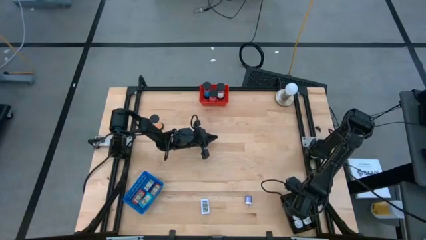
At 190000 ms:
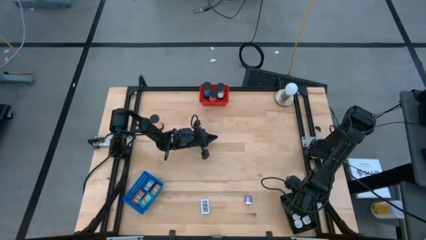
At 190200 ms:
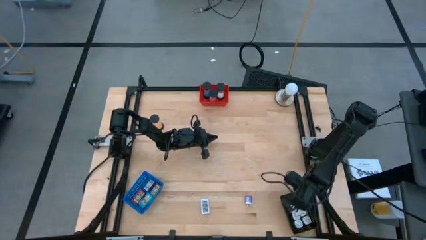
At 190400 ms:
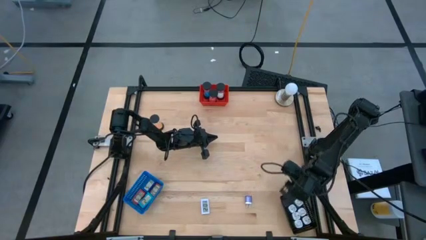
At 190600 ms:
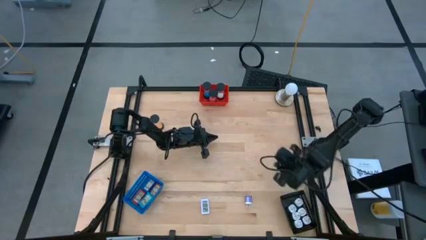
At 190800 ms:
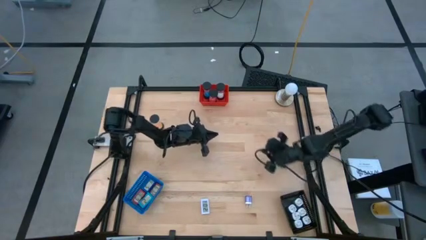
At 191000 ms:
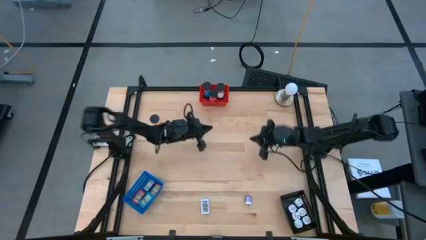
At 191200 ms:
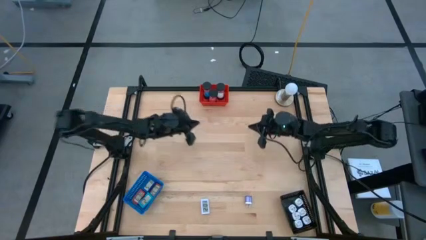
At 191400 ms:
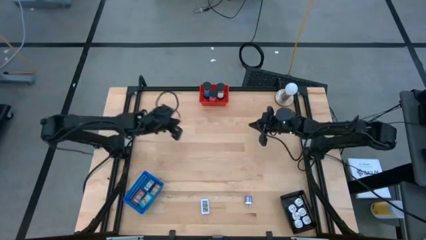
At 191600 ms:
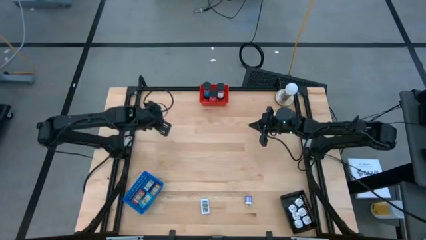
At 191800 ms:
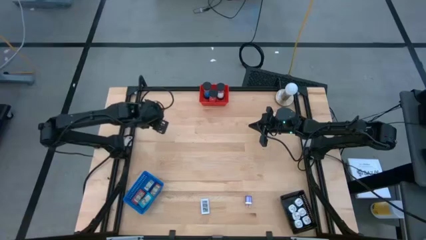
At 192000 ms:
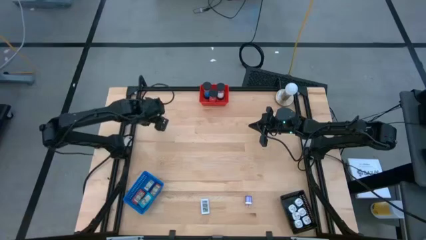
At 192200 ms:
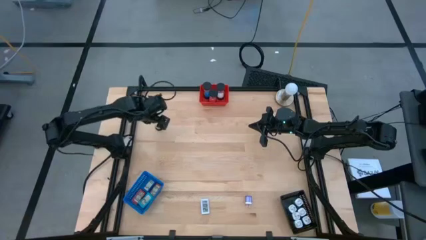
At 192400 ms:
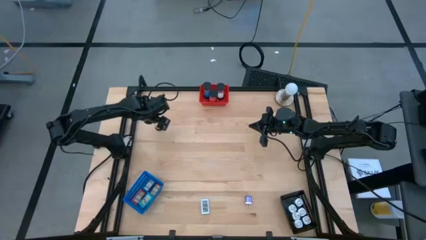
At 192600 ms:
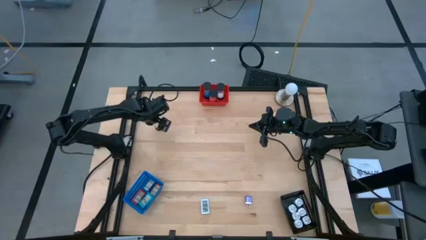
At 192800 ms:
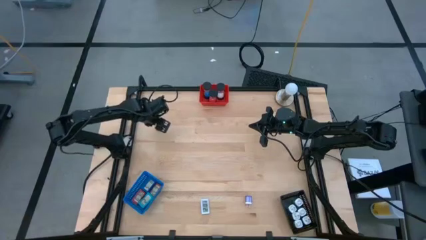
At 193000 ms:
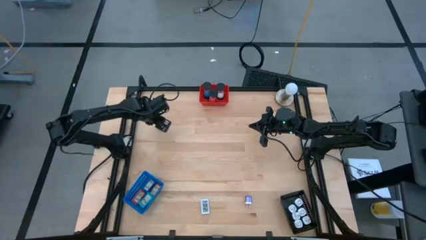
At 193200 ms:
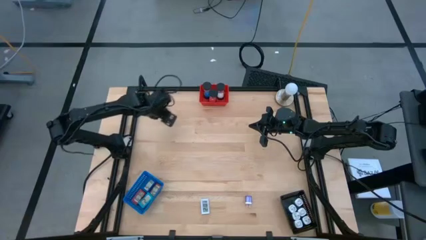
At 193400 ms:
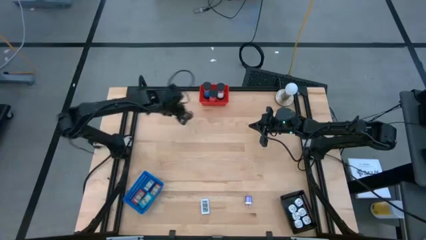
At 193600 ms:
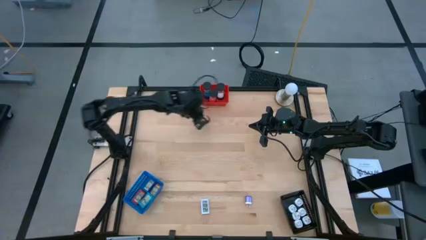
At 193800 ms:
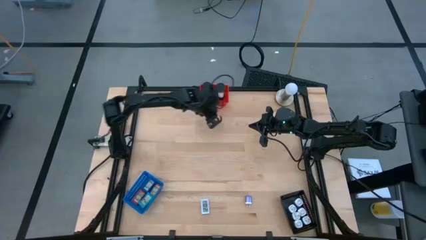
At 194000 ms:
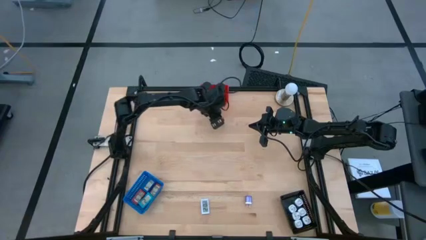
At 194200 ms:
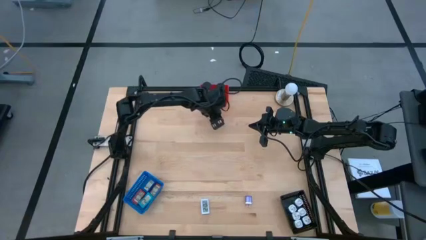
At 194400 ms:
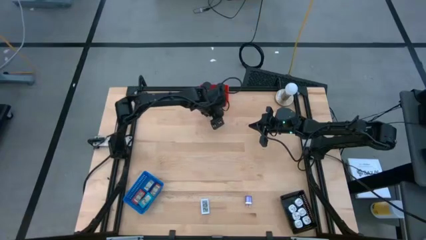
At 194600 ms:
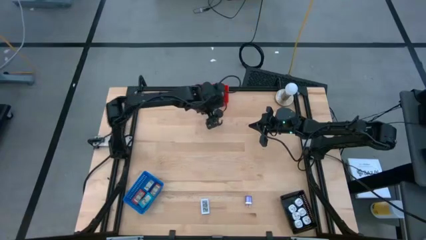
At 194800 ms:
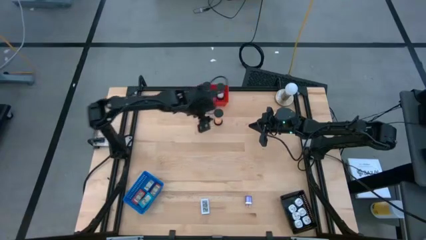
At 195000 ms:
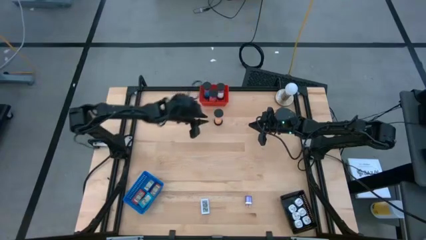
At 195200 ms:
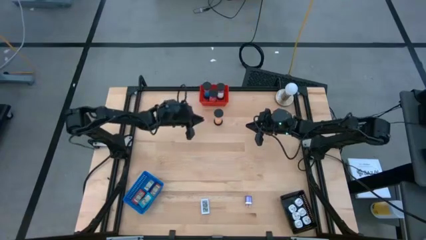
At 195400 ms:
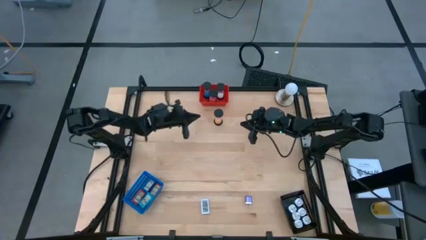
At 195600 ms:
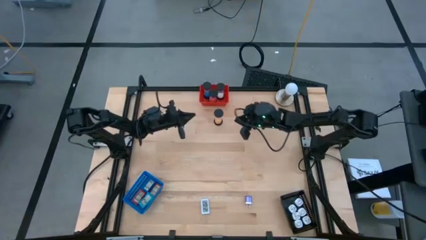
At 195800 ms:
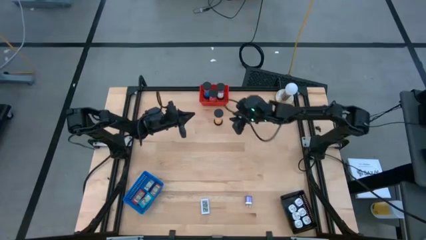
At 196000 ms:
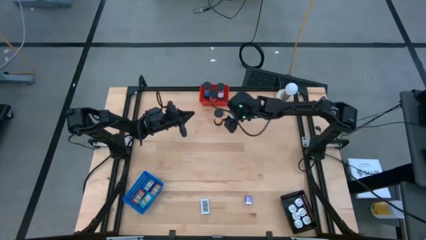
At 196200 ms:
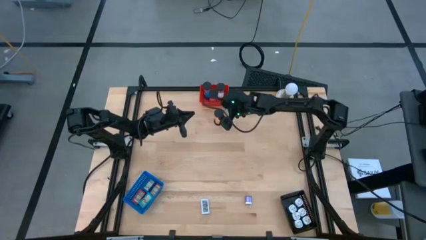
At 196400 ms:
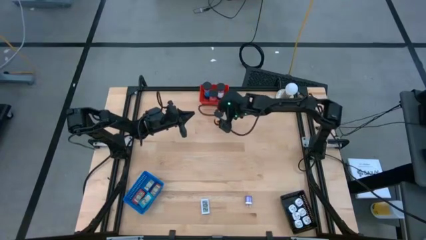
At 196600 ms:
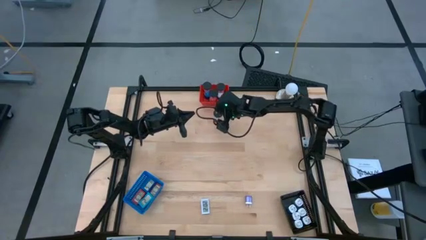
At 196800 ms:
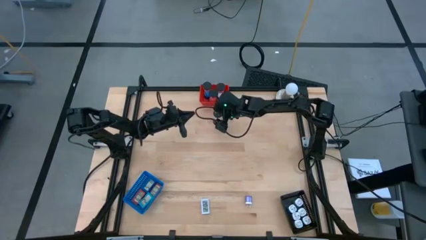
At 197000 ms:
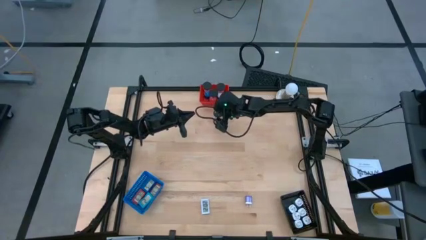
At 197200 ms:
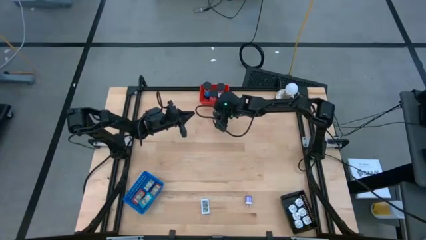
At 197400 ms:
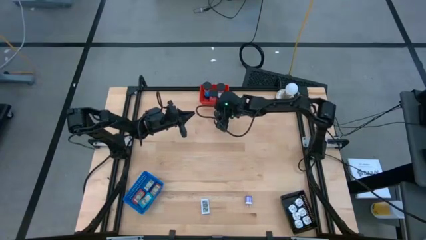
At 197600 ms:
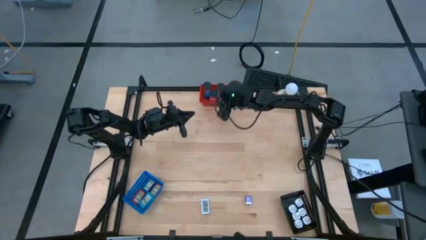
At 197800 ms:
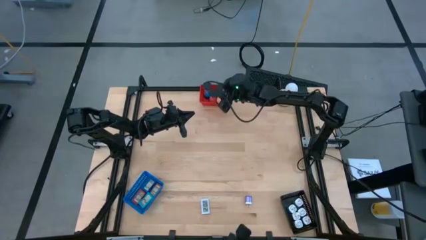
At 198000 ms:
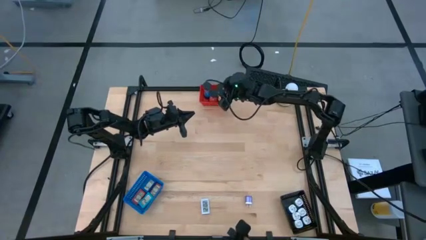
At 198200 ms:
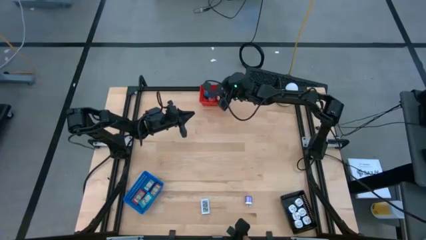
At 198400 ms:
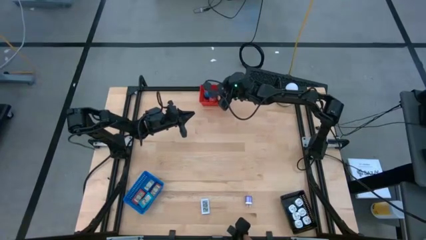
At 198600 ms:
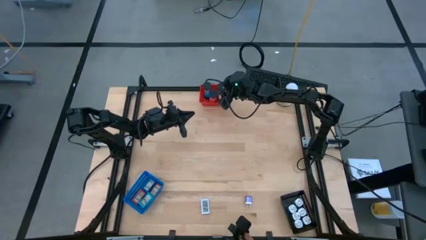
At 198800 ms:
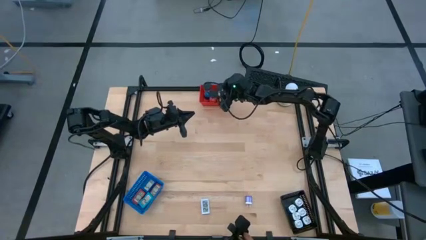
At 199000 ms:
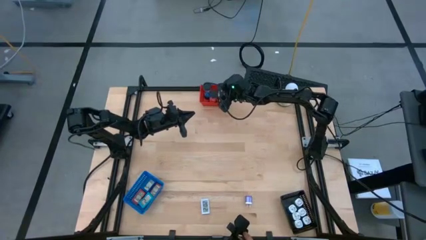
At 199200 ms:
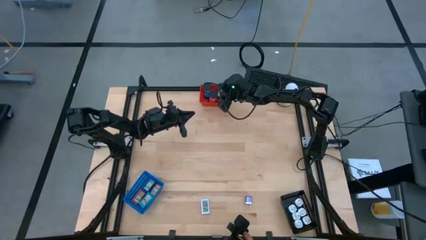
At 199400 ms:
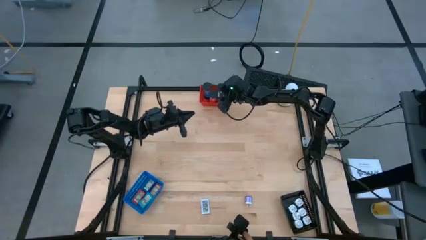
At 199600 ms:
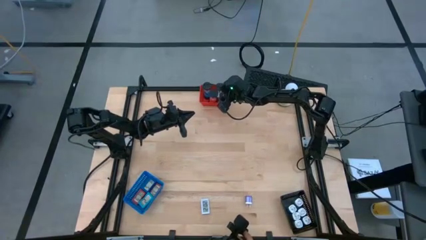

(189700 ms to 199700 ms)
Task: Pick & Place Office items
Put the orange hourglass into the red bin
